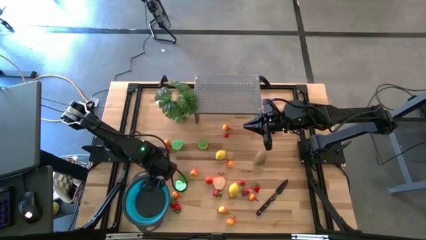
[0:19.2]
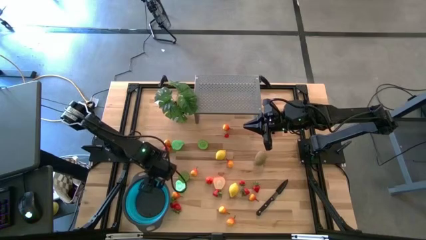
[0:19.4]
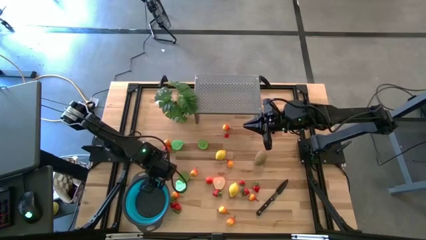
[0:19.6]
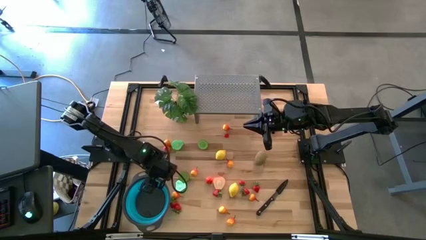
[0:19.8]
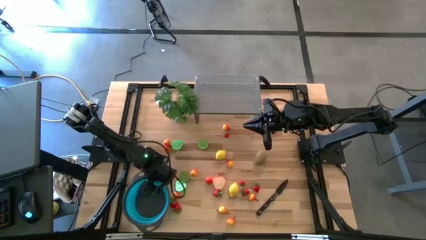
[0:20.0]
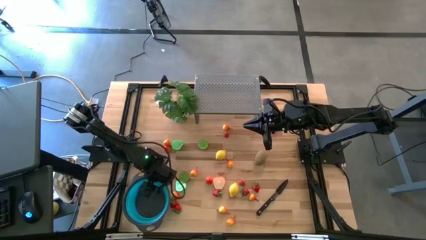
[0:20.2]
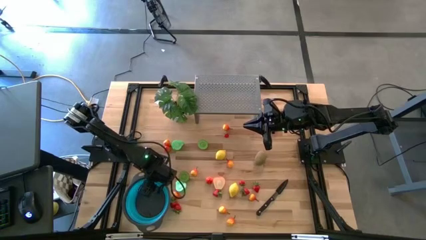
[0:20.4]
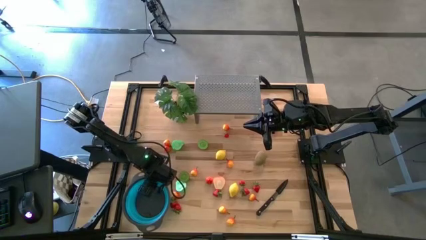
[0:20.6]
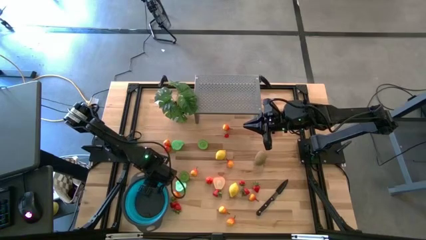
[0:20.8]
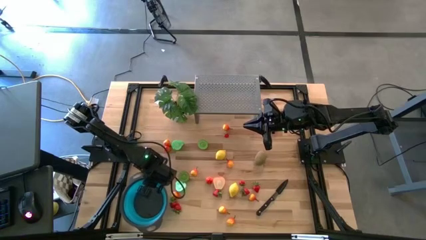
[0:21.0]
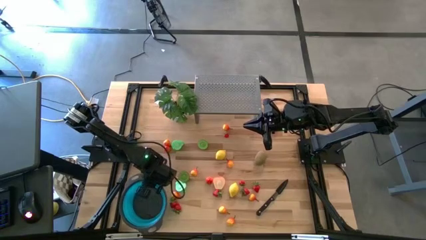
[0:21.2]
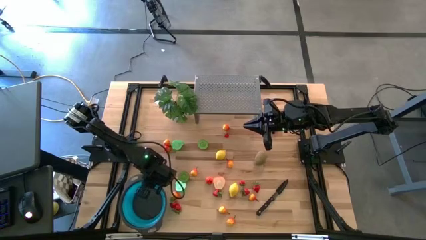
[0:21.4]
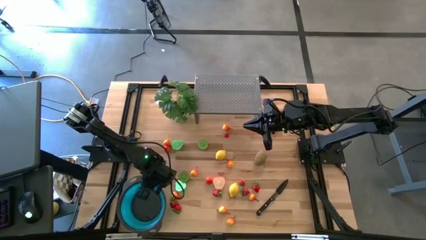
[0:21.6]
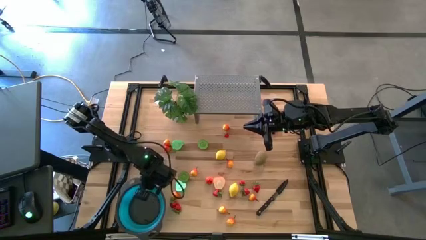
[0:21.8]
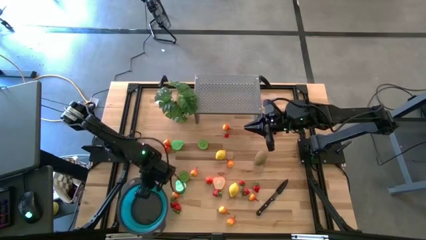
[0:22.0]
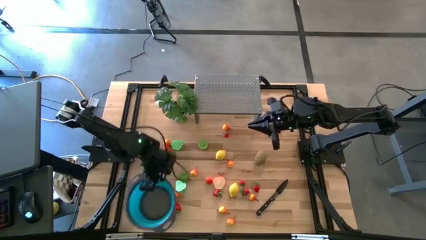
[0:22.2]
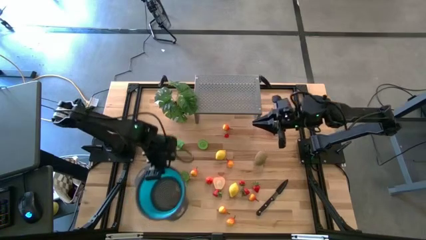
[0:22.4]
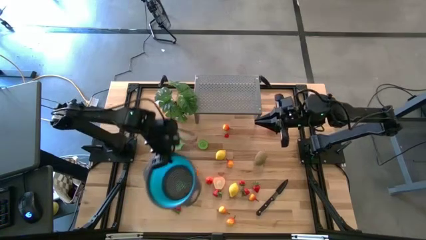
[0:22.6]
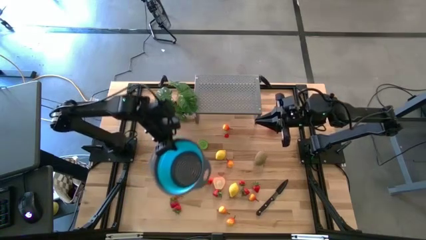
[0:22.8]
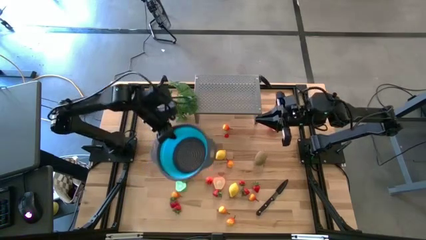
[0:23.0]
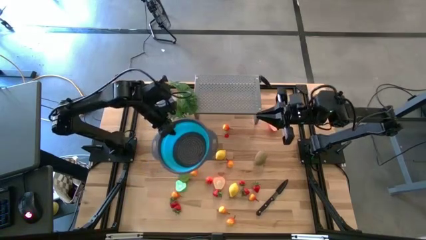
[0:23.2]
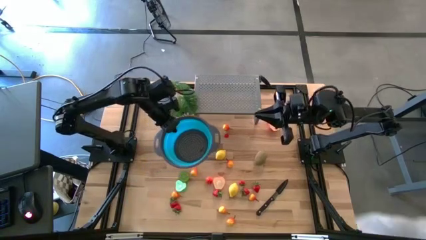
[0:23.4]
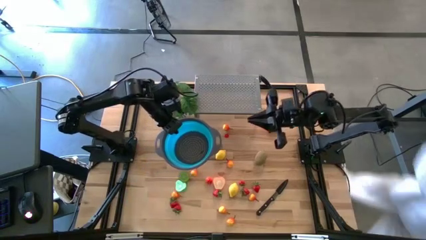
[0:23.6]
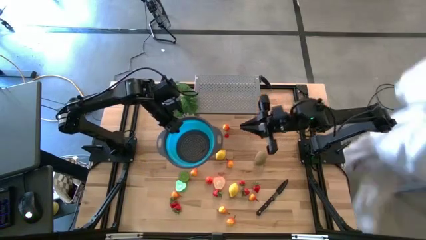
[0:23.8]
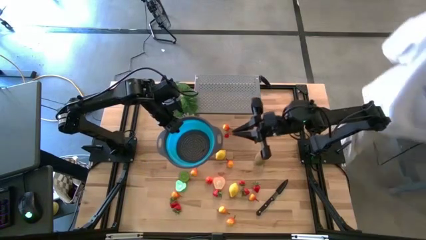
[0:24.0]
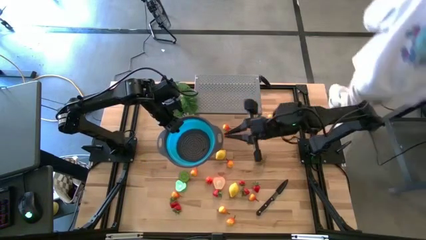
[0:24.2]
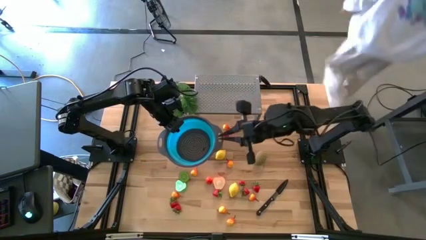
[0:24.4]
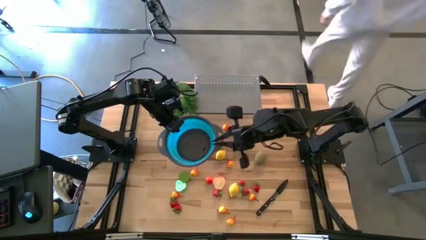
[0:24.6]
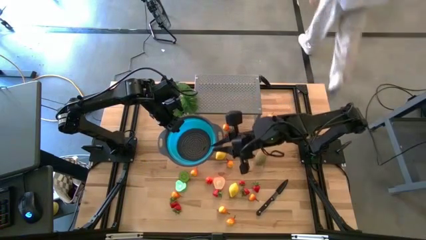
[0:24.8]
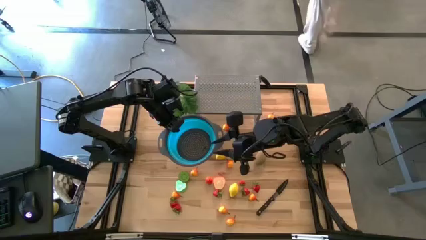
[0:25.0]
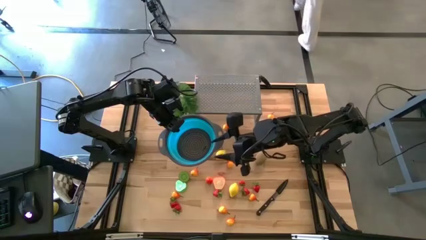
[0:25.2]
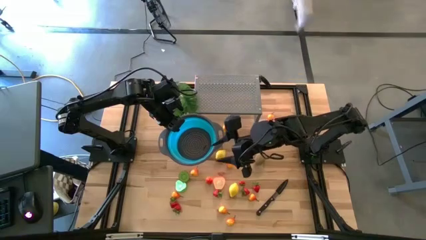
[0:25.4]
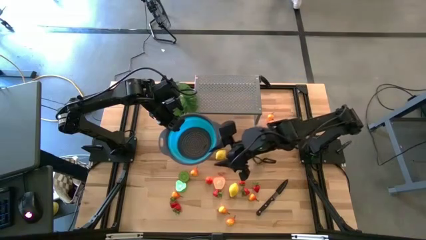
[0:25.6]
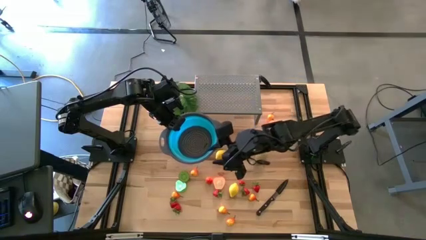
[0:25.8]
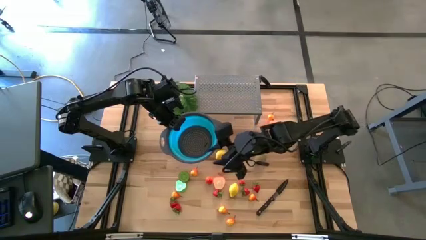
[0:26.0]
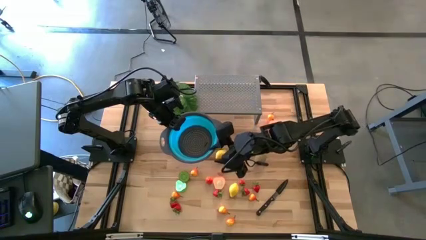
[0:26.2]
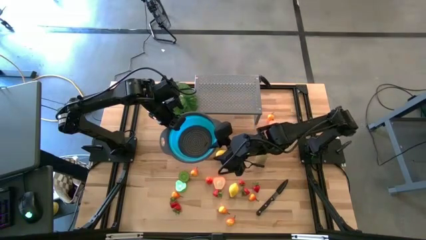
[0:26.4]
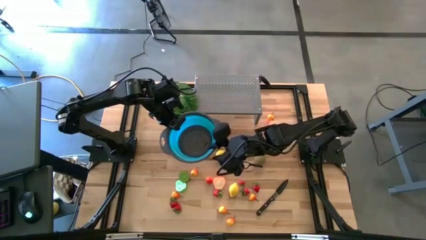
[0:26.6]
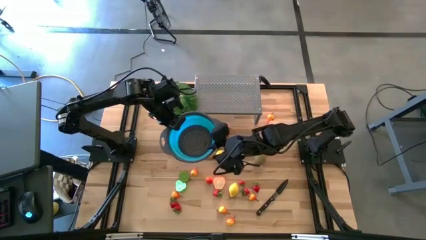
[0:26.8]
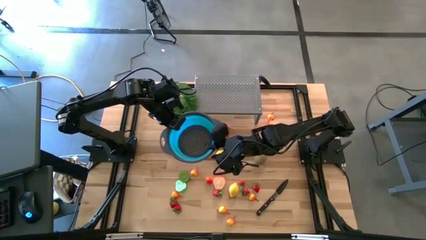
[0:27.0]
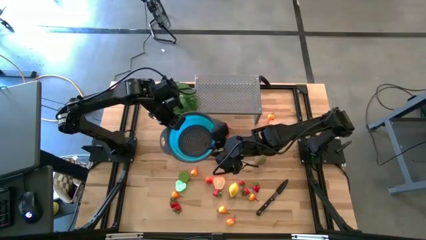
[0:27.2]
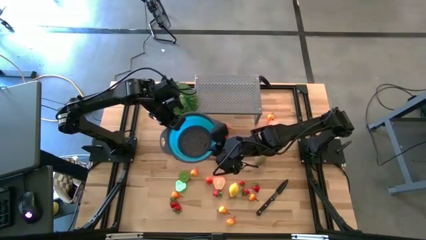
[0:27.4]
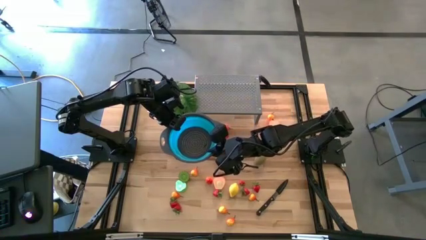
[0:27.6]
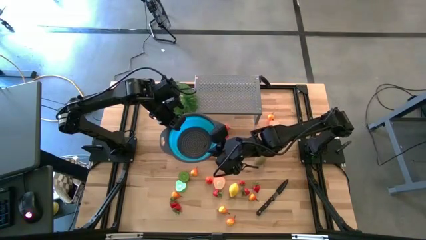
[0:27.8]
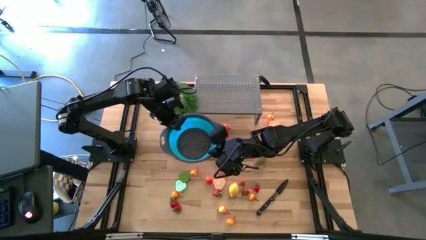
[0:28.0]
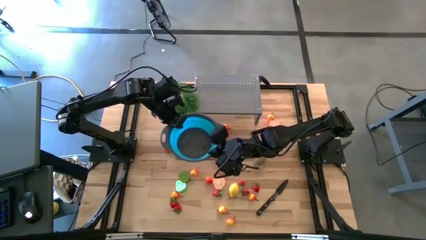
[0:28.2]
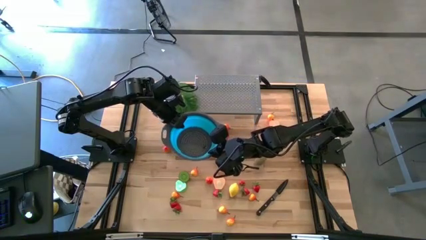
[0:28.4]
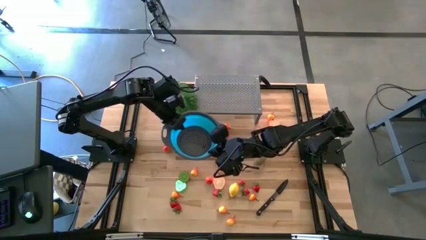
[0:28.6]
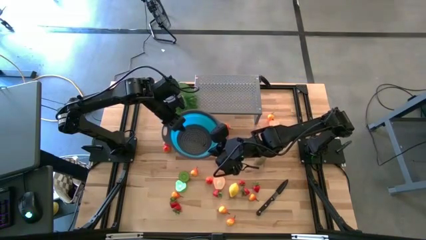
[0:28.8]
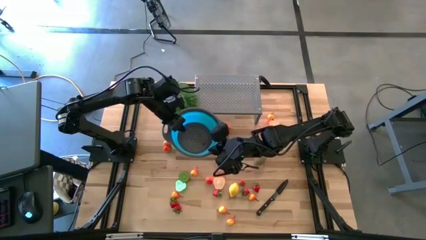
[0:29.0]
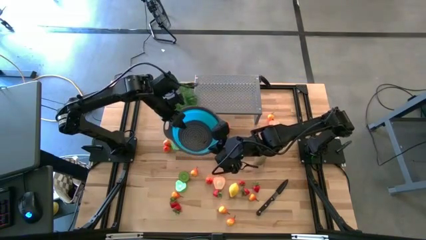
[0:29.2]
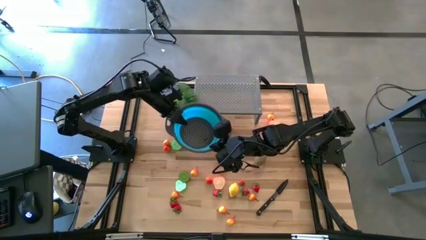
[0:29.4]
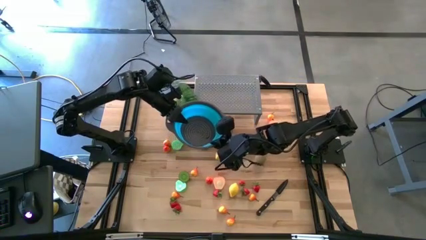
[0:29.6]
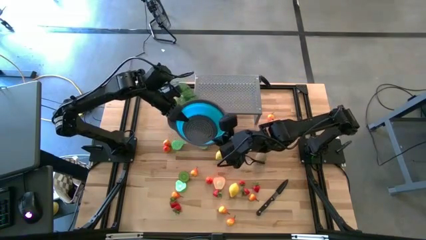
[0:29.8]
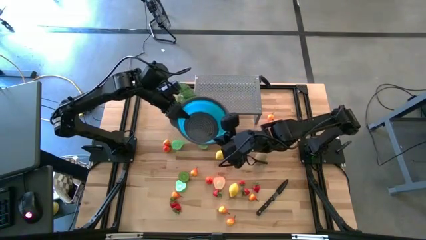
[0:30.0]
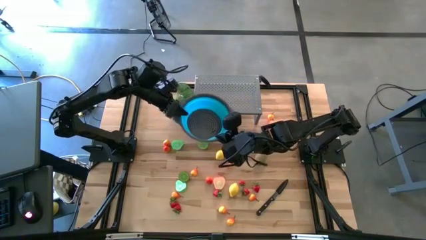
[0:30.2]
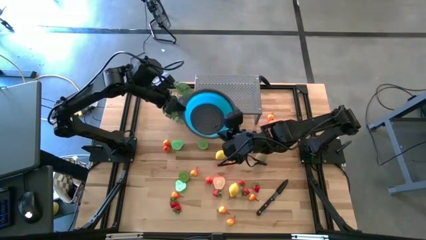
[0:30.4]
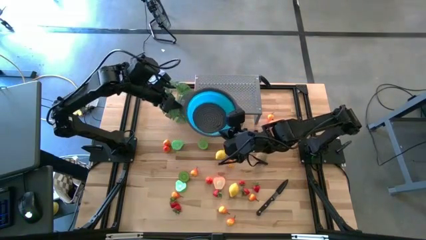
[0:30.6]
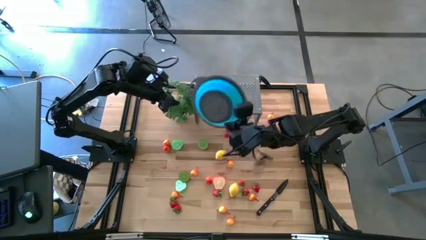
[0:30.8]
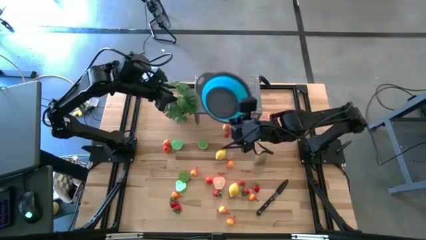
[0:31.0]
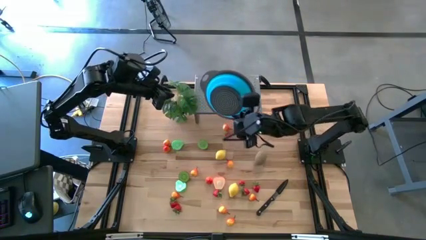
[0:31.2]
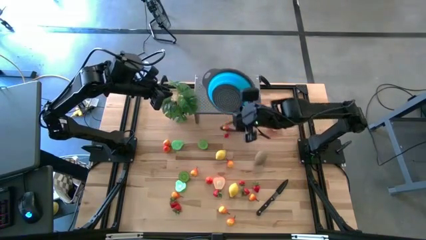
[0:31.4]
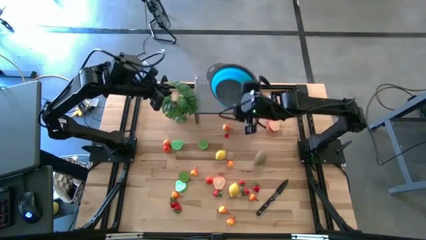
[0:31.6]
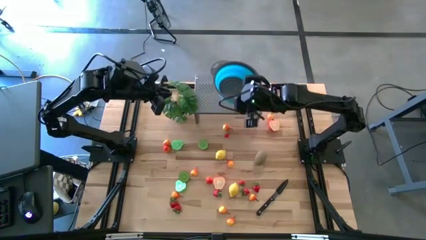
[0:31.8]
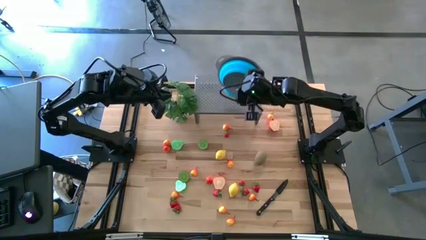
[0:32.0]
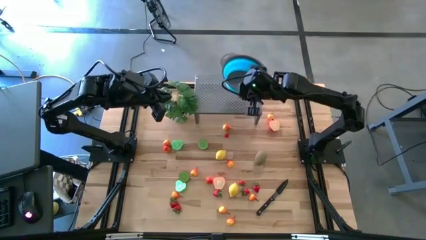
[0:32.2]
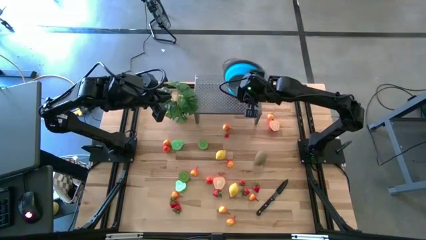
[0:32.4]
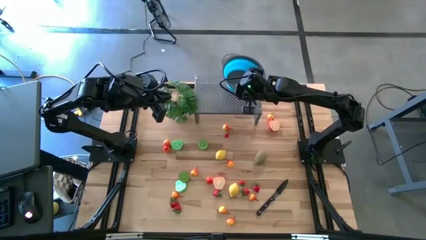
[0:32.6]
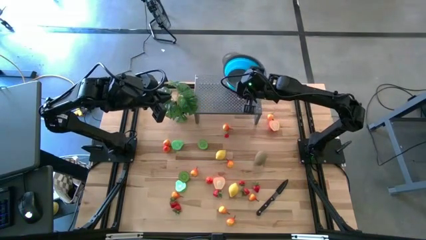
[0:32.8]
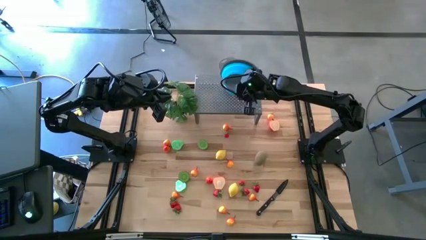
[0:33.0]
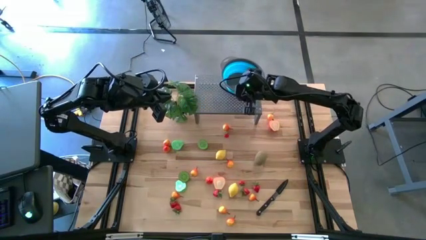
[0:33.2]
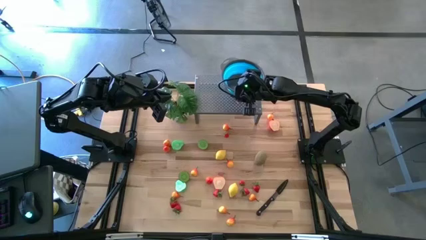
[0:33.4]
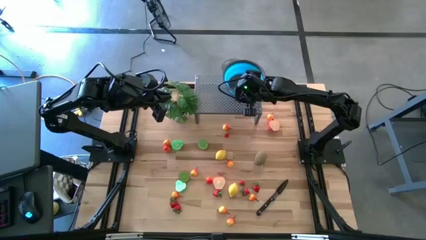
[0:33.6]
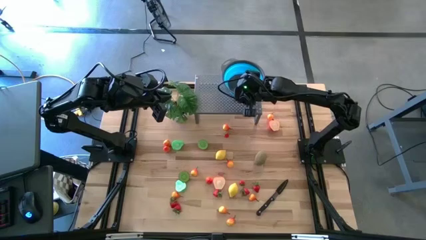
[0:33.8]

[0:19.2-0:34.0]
Task: Pick & Place Fruit
Put the blue bowl on the shelf

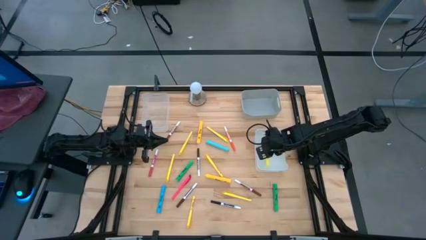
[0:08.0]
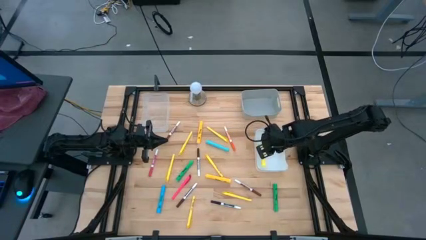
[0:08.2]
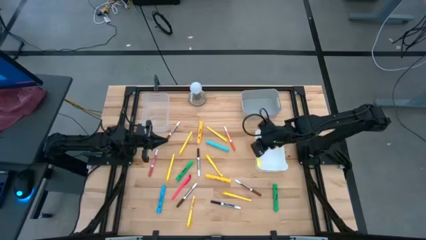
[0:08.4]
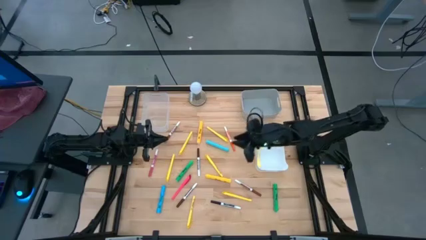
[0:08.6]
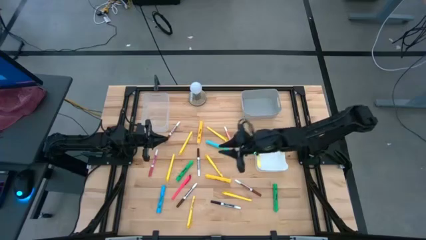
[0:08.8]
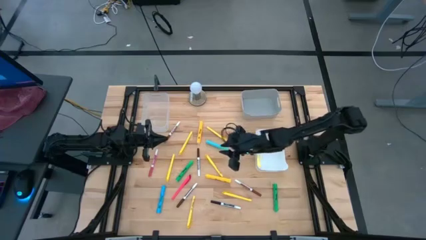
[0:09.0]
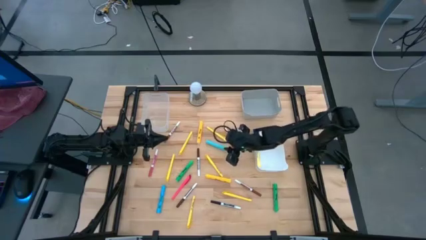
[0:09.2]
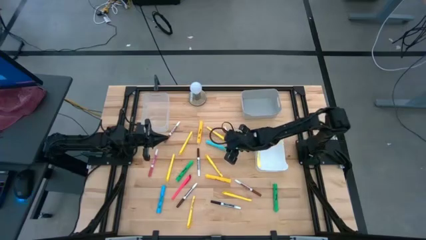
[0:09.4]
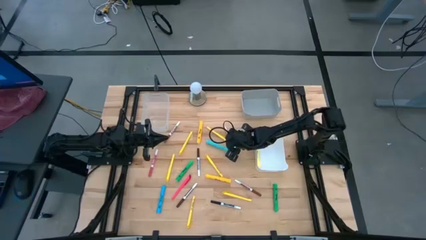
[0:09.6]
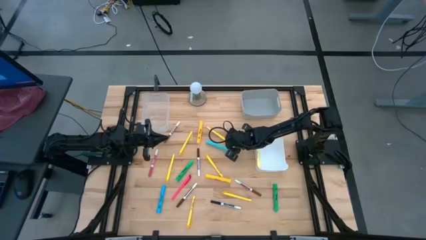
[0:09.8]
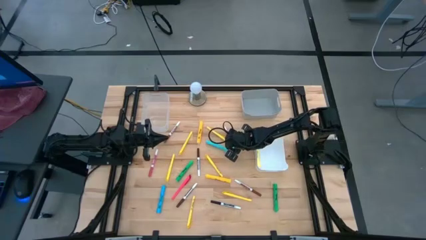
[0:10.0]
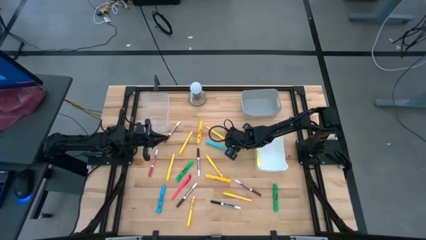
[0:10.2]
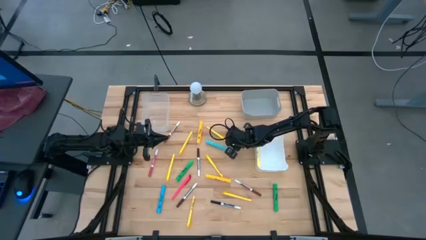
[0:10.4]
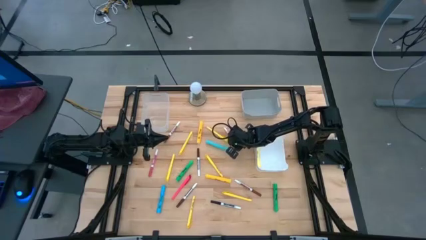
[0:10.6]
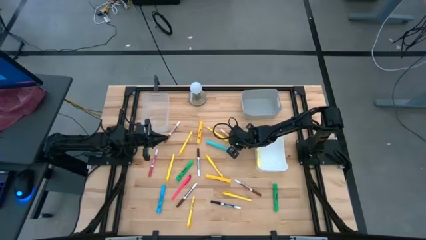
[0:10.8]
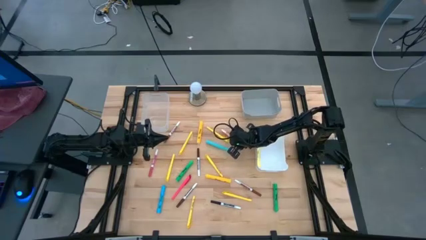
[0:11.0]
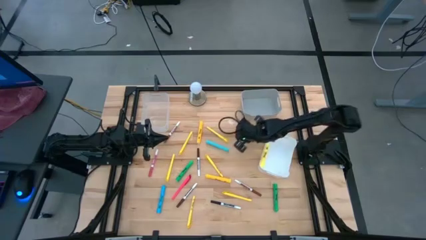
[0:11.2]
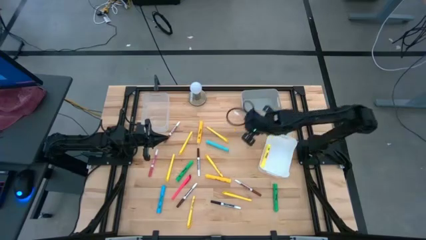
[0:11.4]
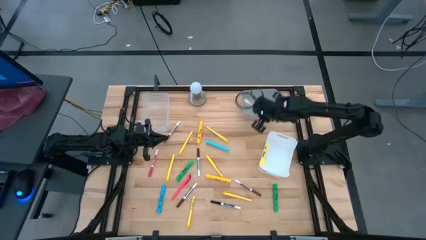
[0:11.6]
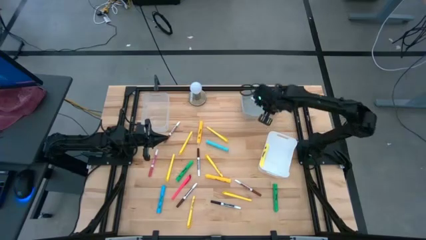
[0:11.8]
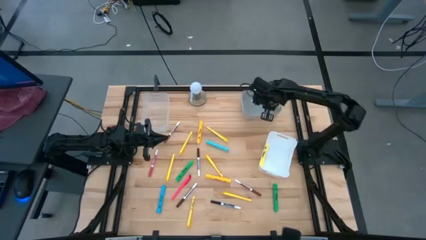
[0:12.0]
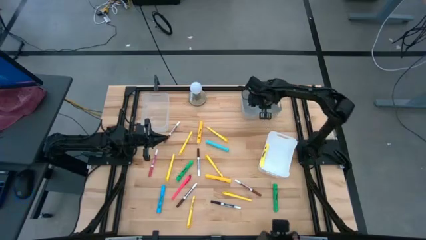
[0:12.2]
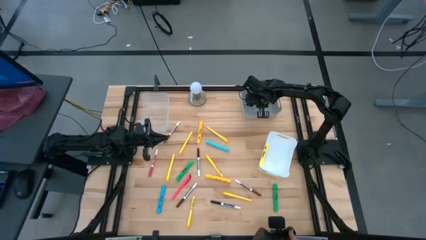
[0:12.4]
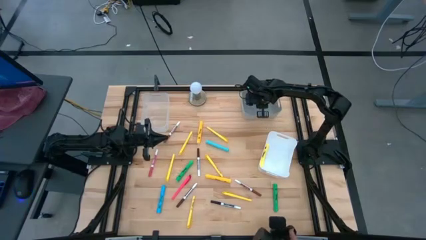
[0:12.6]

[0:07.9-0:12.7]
Task: Pick & Place Markers
Put the orange marker pen into the gray bin
